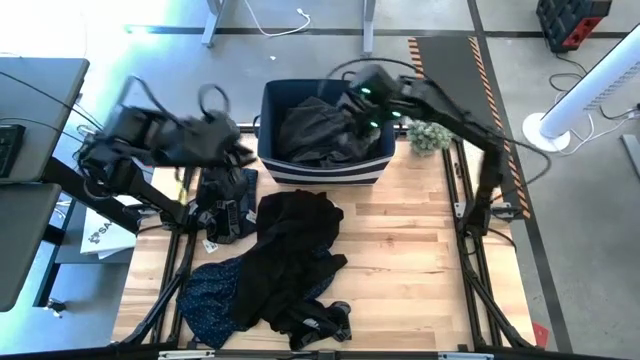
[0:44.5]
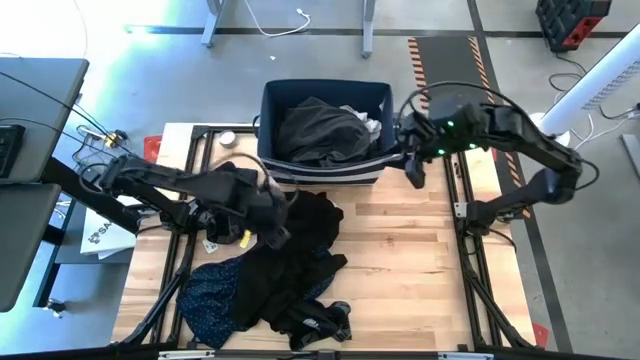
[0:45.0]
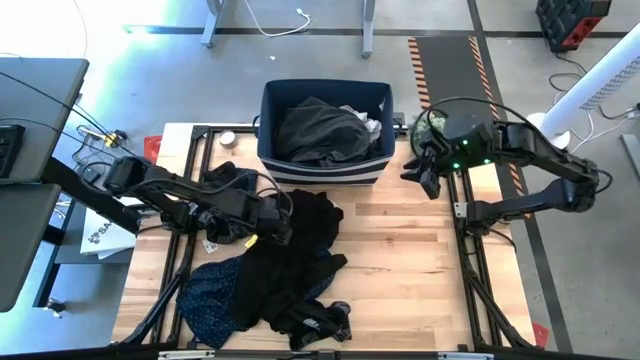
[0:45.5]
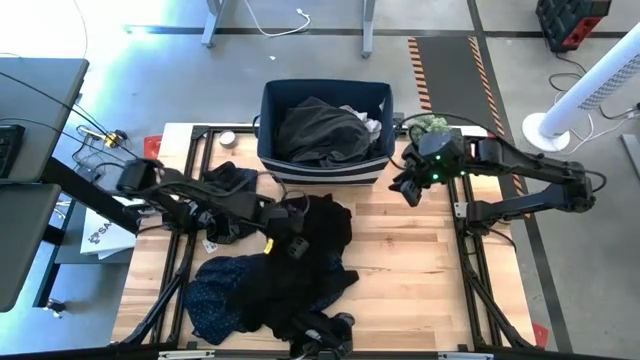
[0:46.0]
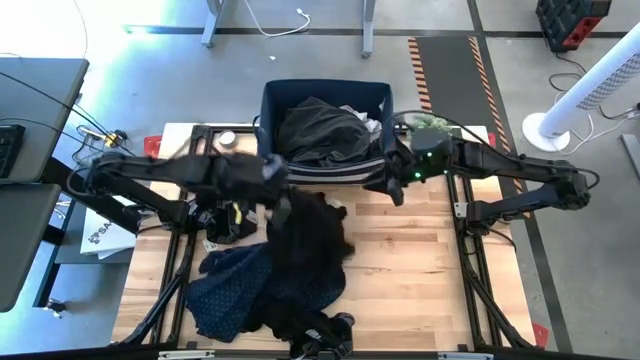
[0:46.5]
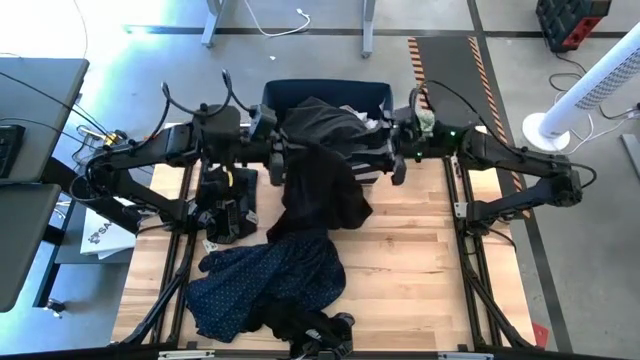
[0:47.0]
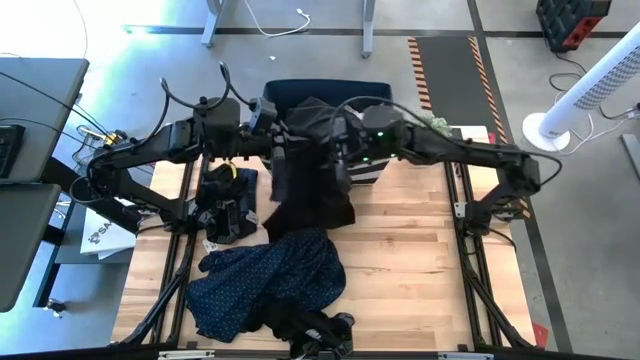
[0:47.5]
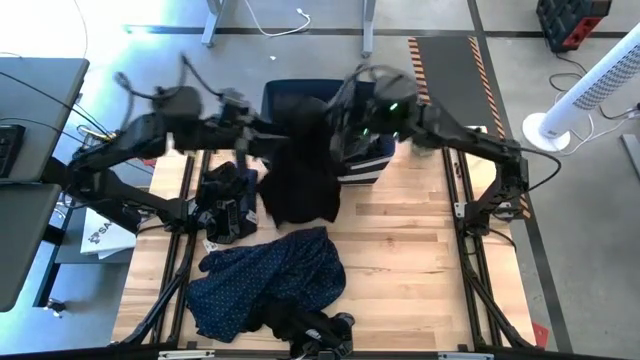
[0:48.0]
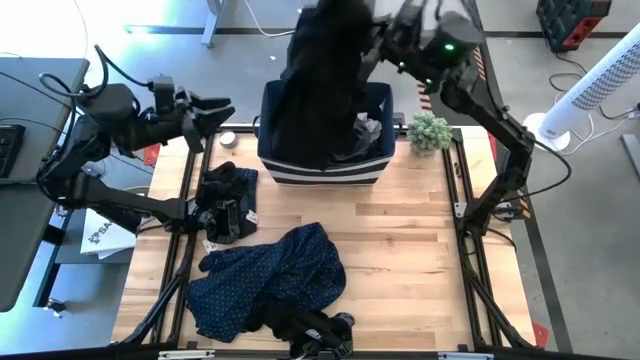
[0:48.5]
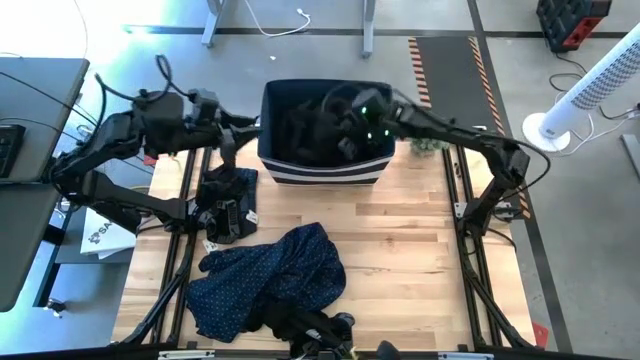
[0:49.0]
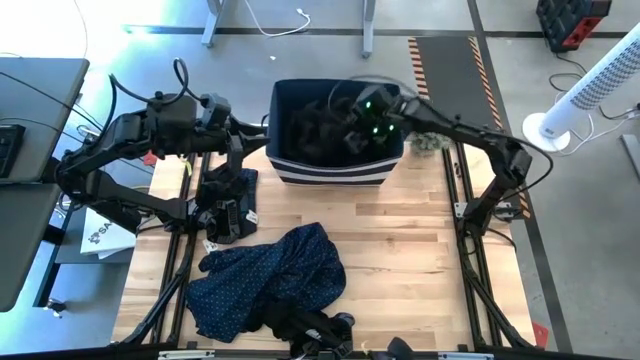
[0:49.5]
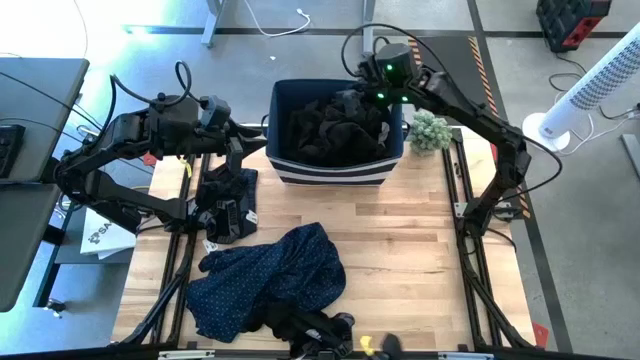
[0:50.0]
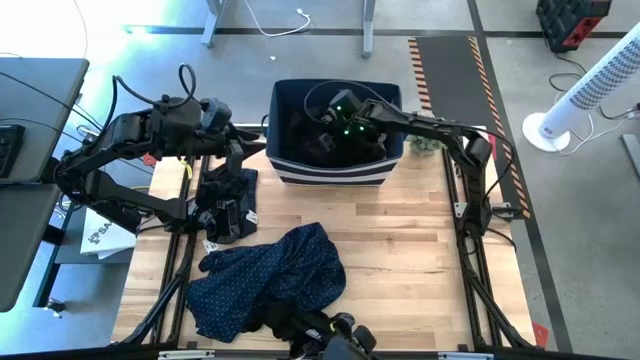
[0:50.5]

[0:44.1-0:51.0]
Task: Sort clothes
Put the black shirt into the laundry bin

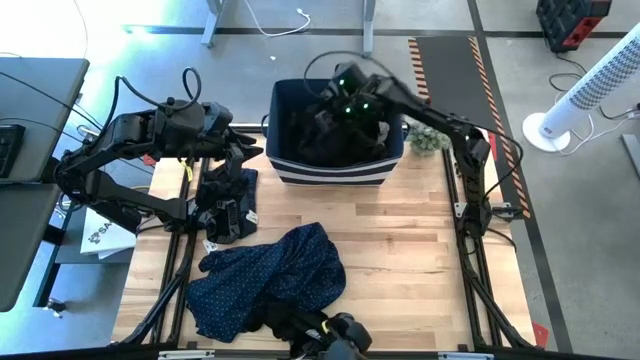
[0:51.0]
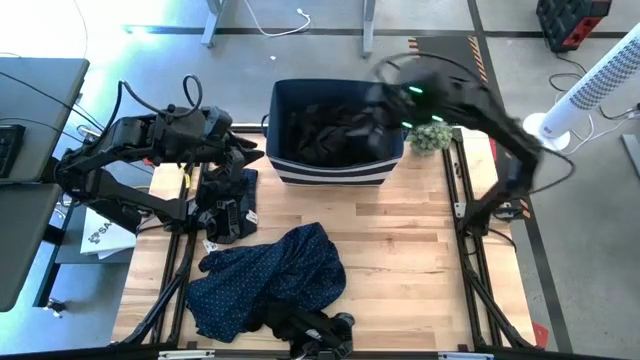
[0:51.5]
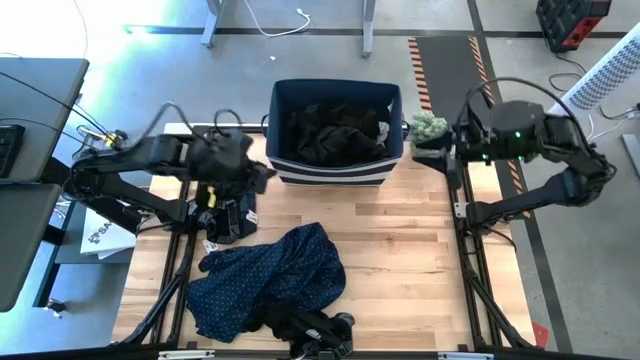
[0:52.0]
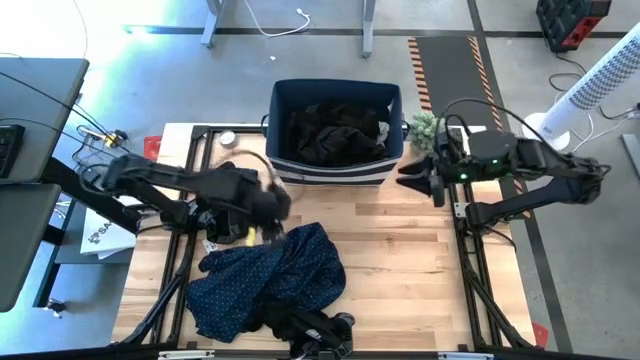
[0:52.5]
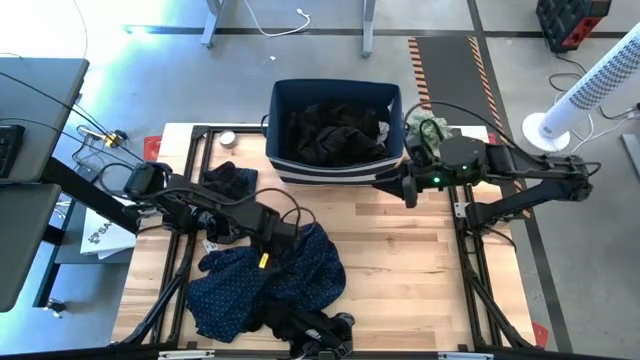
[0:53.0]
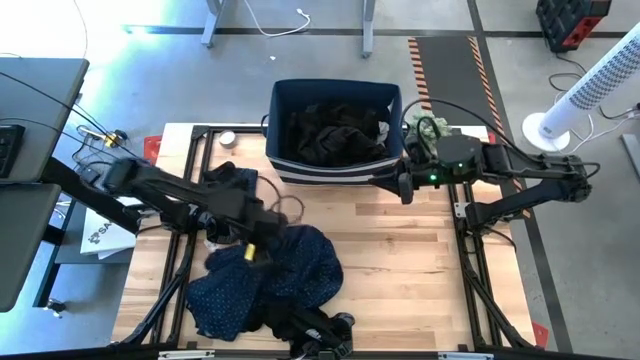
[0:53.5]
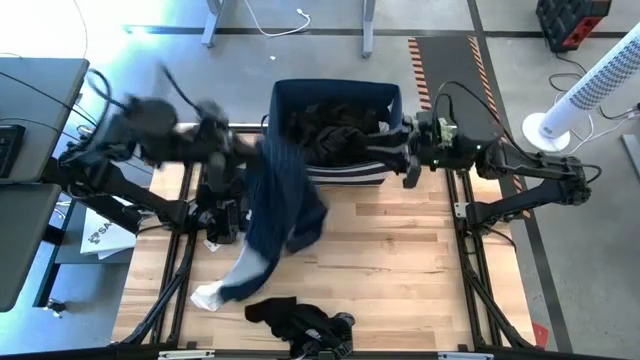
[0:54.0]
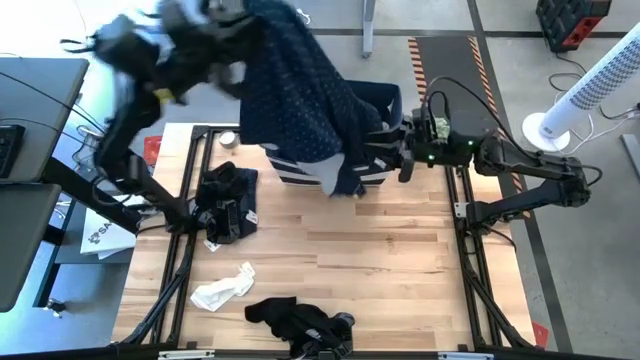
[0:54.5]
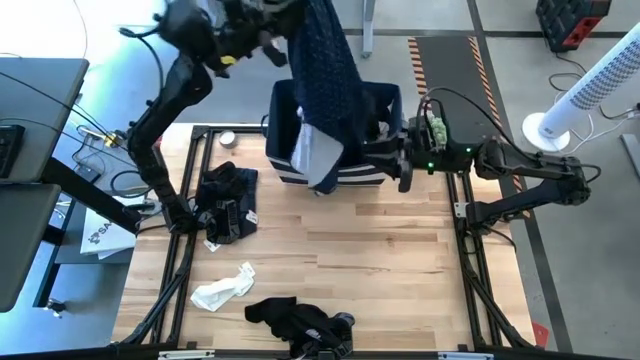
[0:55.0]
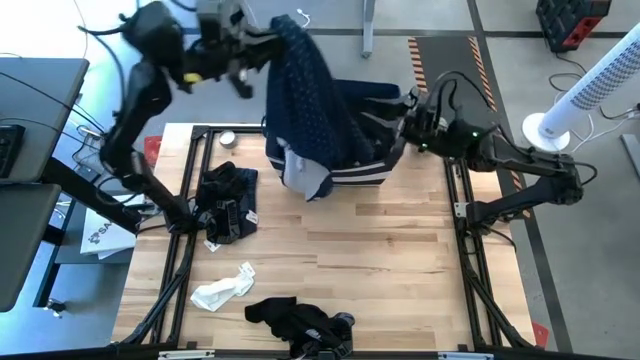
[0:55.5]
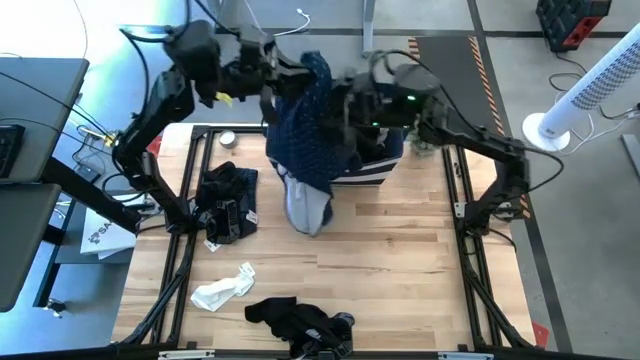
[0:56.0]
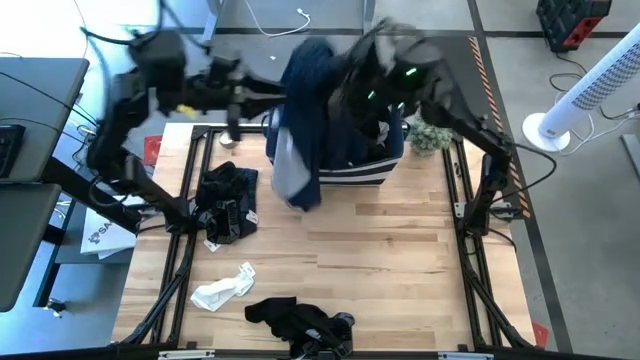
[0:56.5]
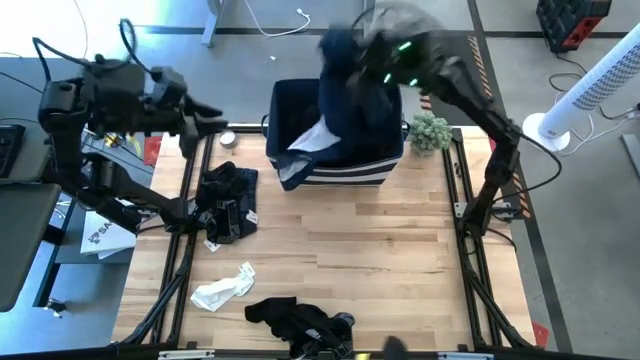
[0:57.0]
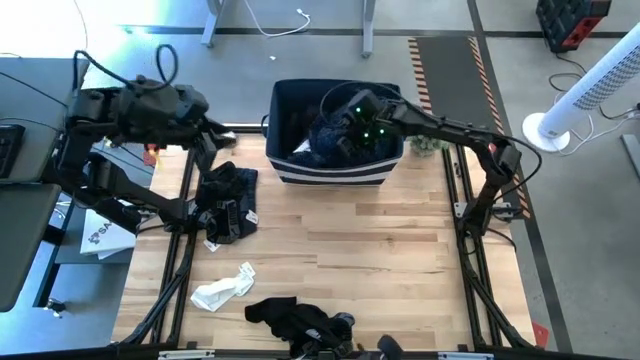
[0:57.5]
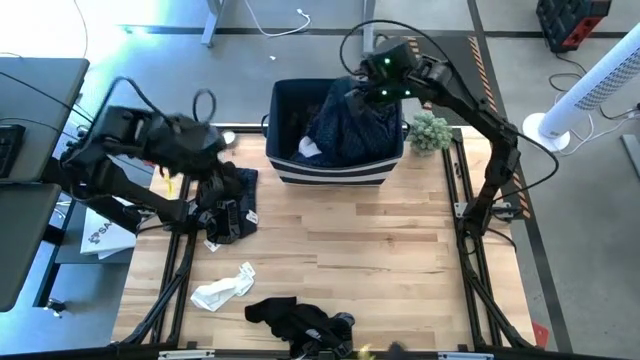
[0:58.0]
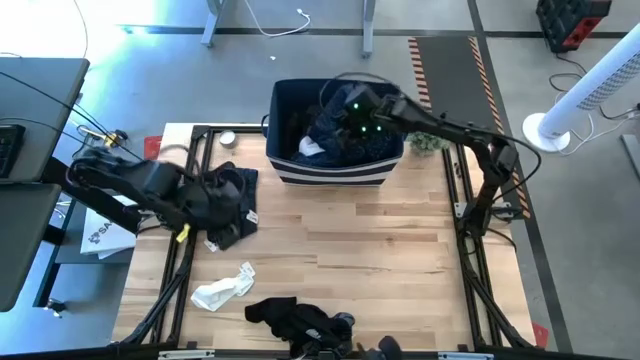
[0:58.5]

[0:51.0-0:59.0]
Put the blue dress into the laundry bin

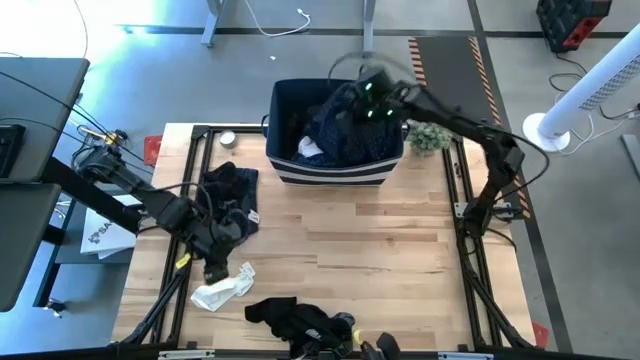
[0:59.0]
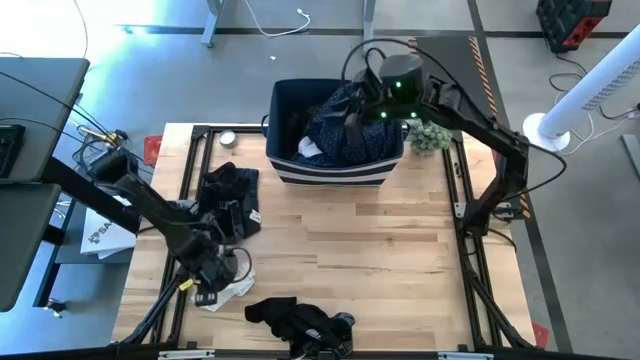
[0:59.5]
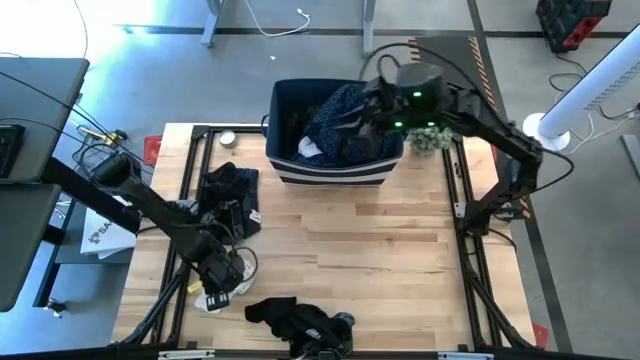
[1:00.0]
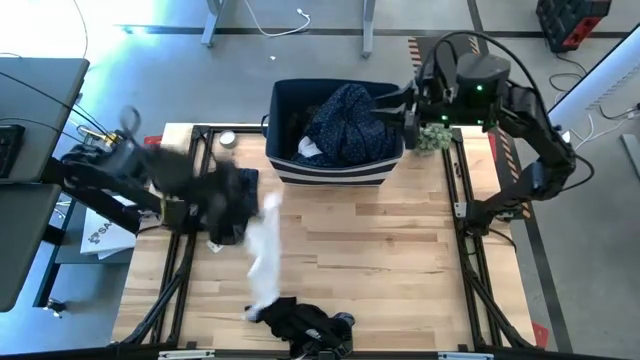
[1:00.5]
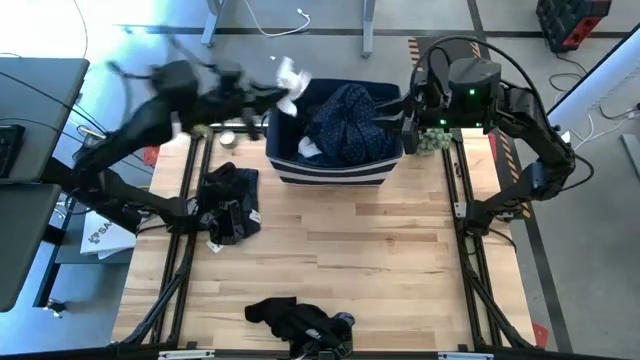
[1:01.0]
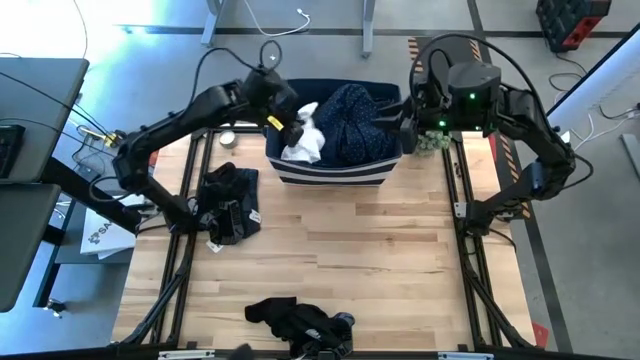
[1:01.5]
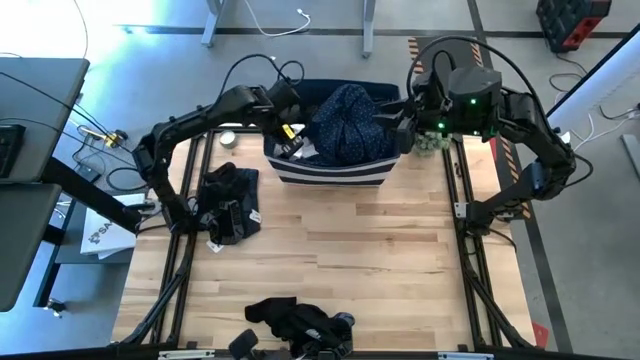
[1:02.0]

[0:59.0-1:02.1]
Put the white sock into the laundry bin

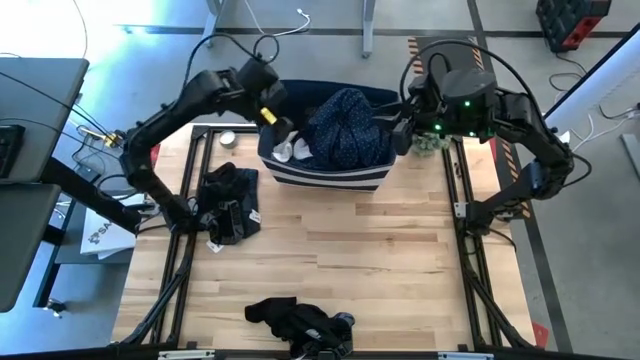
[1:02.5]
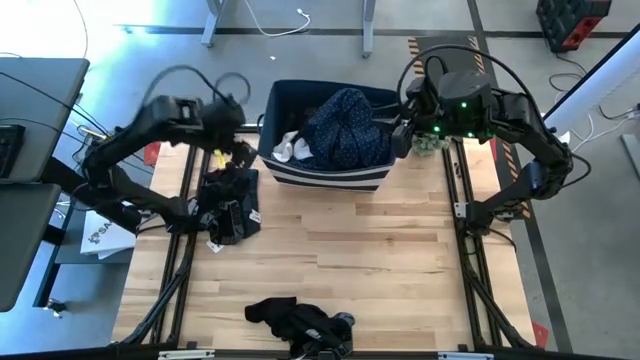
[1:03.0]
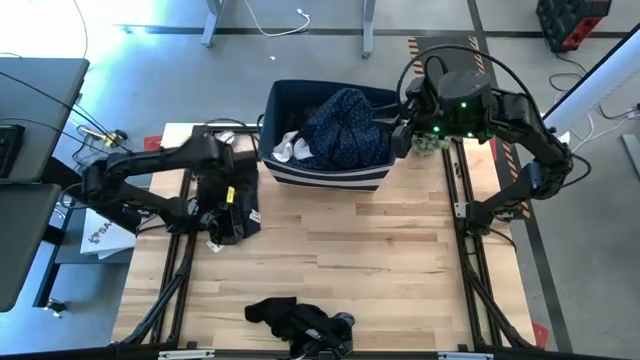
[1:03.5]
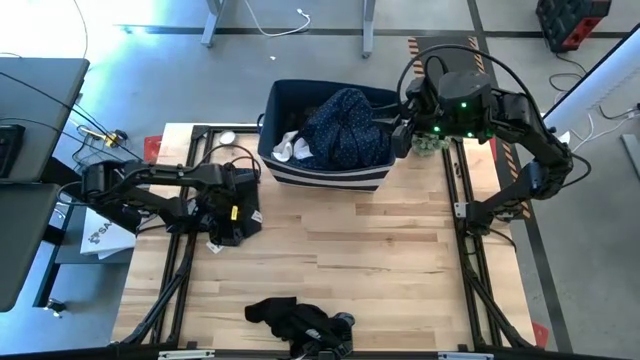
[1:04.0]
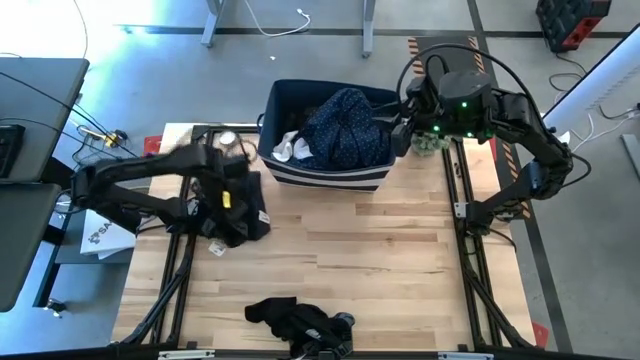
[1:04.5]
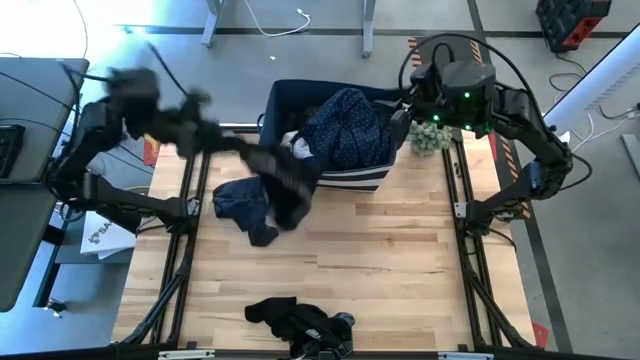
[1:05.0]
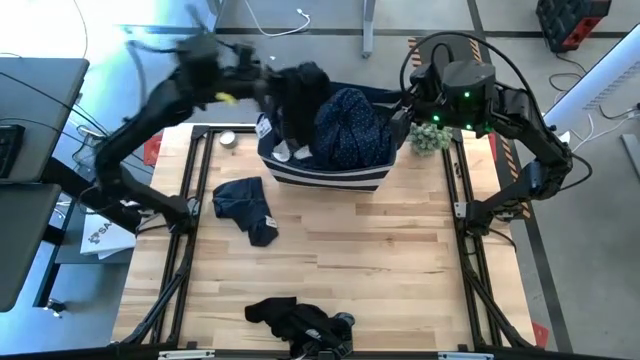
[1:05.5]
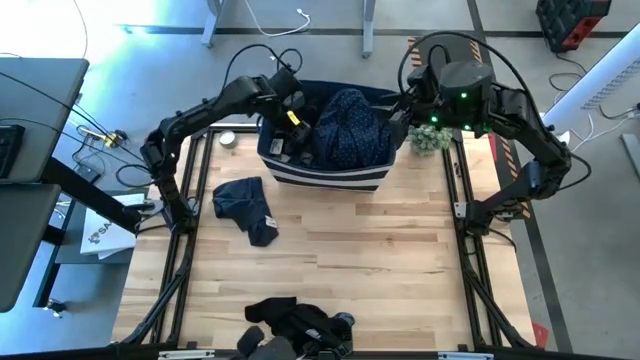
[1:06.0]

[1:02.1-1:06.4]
Put the top black boxer into the laundry bin
